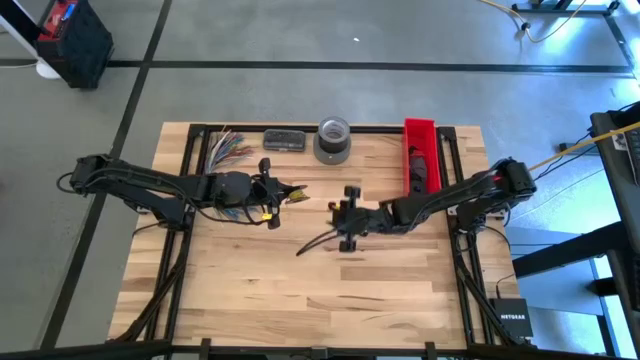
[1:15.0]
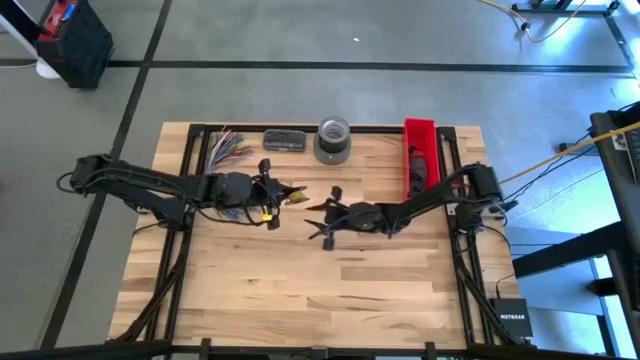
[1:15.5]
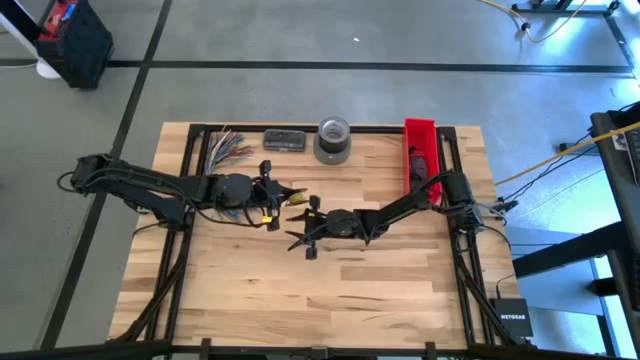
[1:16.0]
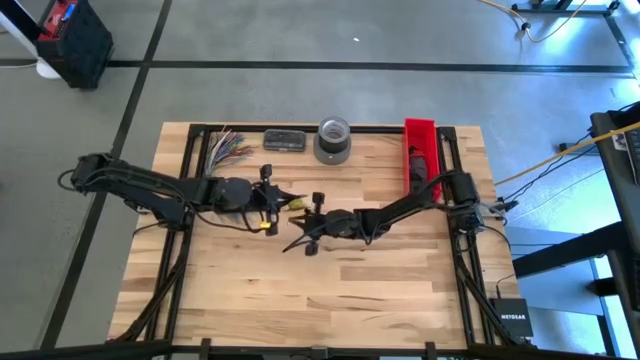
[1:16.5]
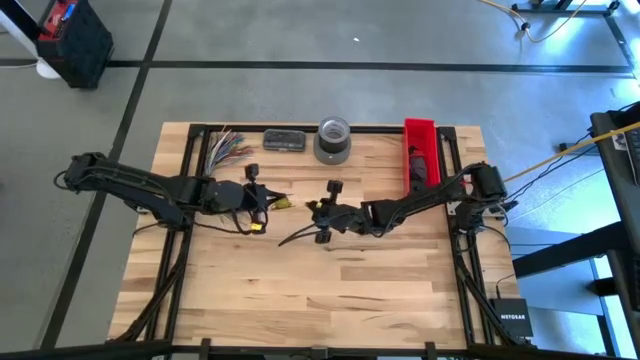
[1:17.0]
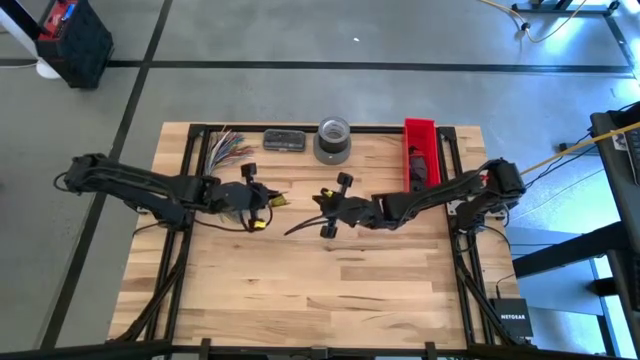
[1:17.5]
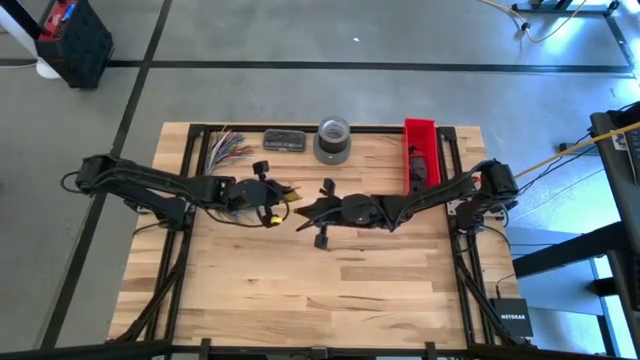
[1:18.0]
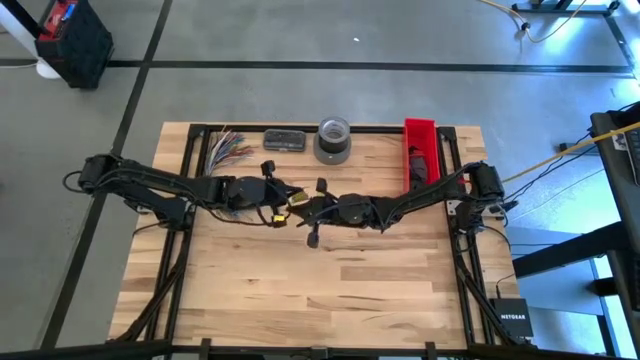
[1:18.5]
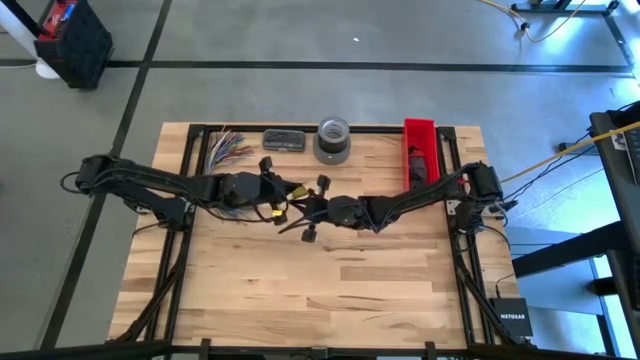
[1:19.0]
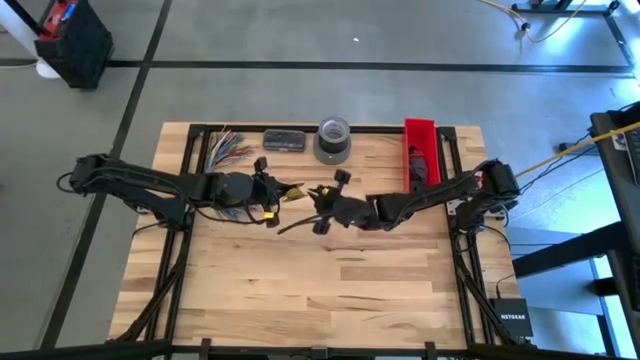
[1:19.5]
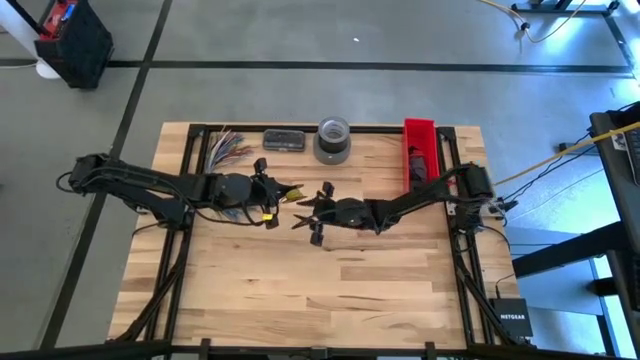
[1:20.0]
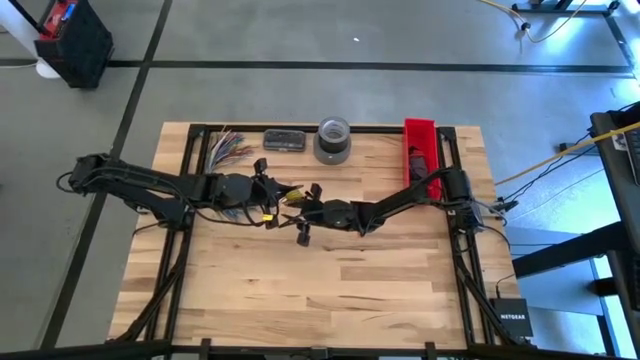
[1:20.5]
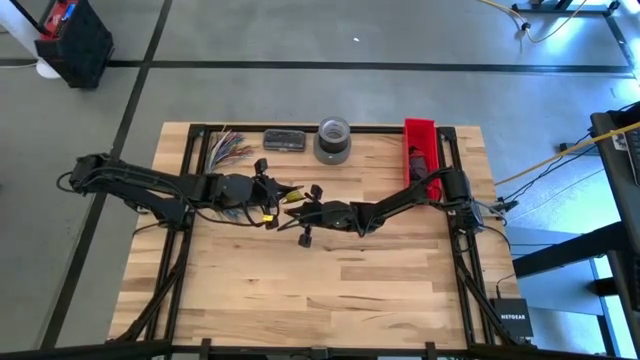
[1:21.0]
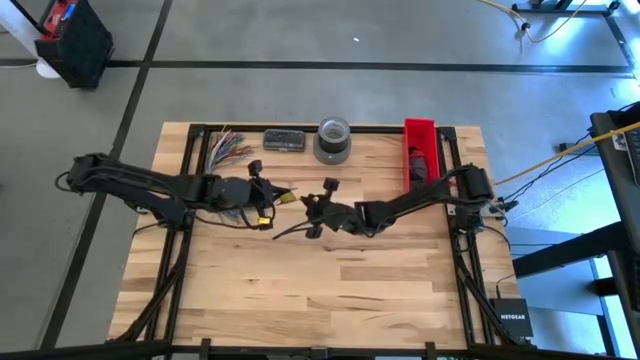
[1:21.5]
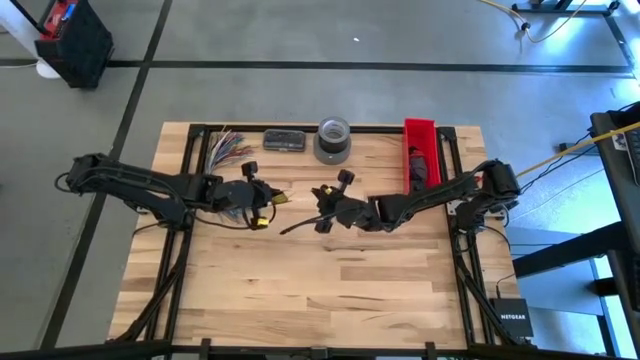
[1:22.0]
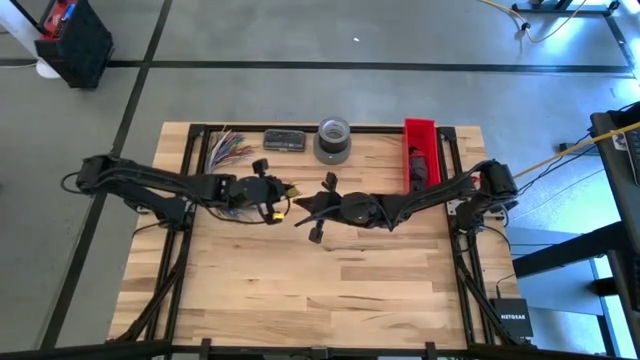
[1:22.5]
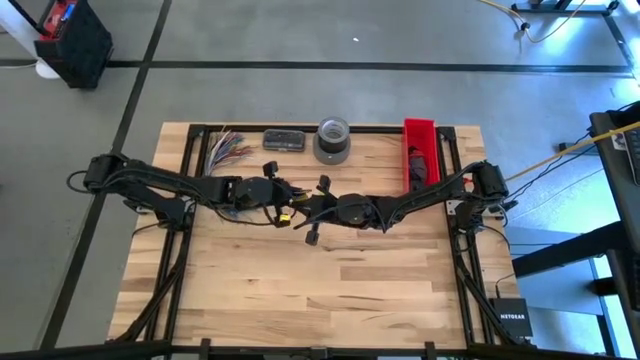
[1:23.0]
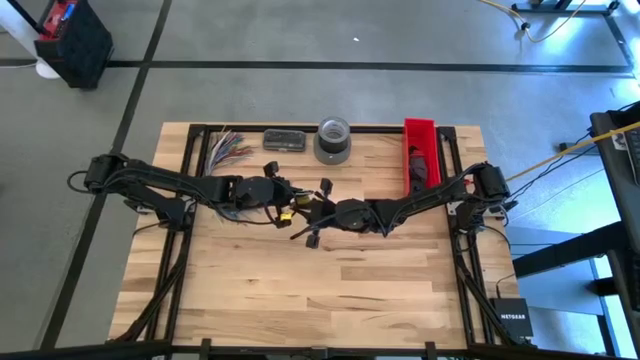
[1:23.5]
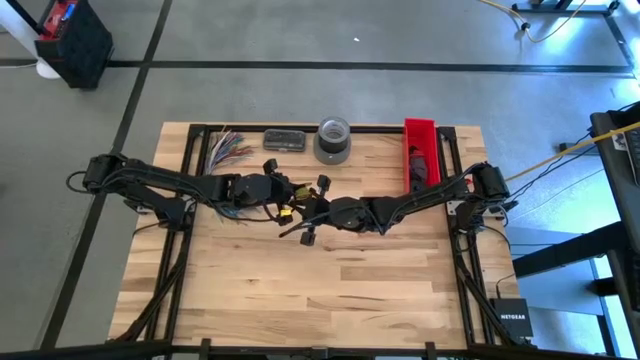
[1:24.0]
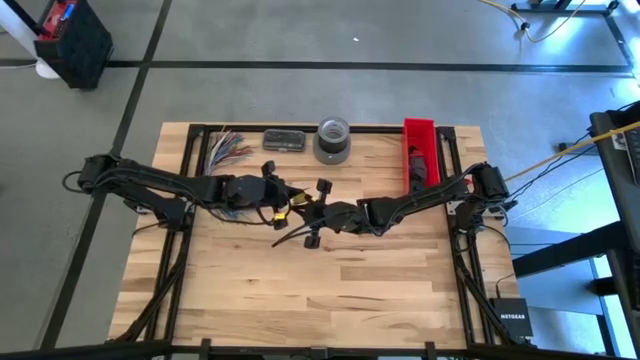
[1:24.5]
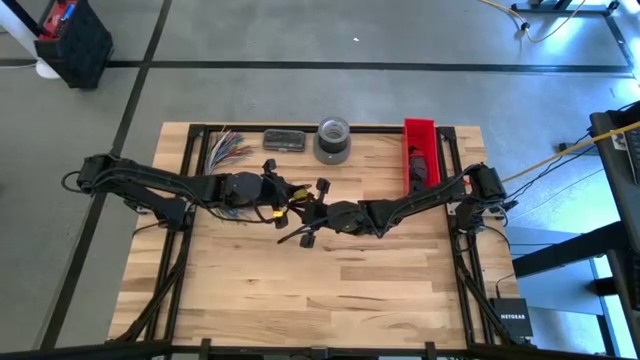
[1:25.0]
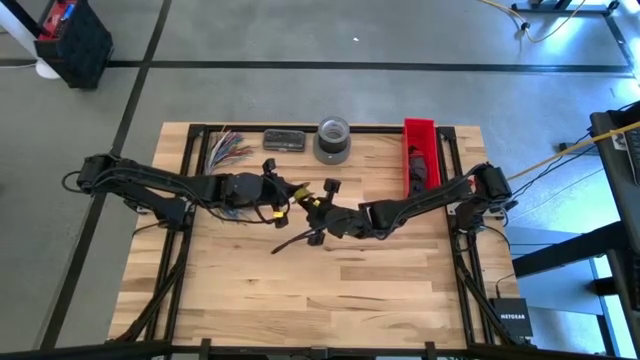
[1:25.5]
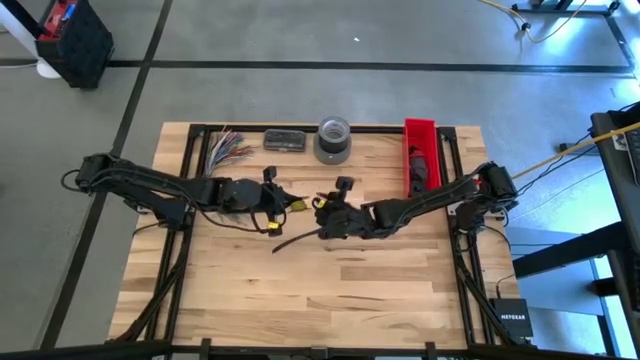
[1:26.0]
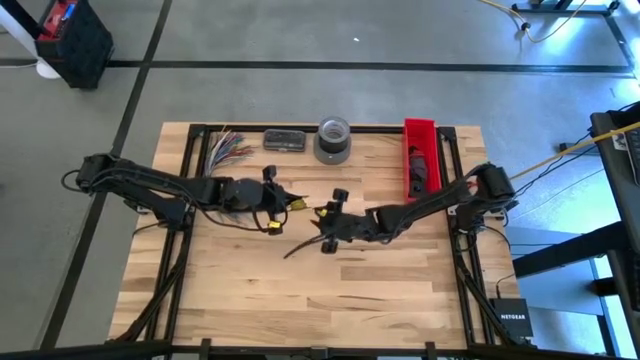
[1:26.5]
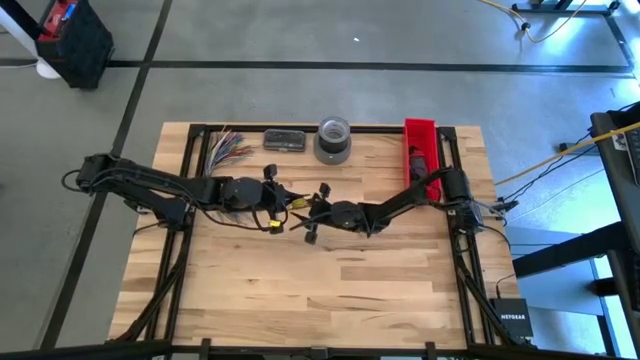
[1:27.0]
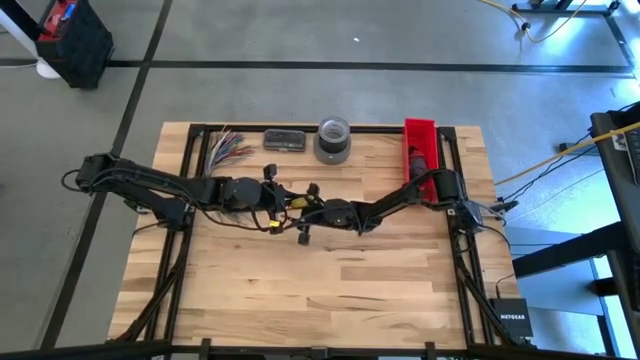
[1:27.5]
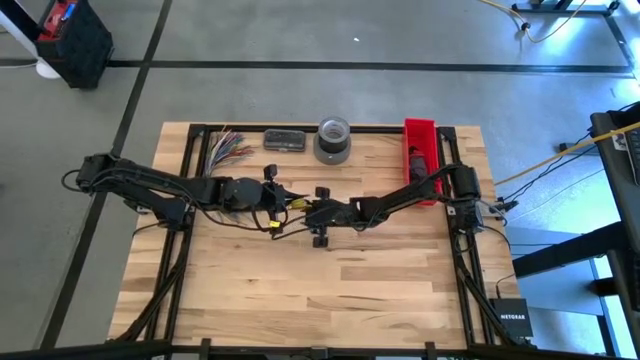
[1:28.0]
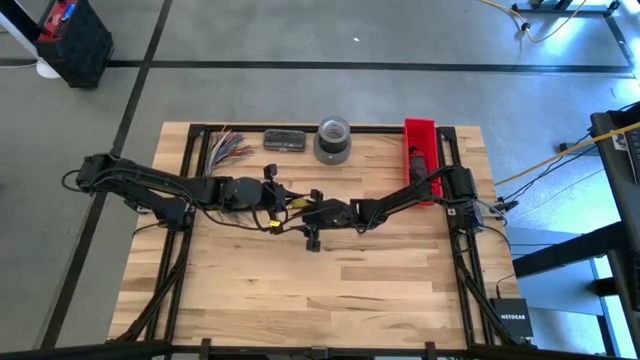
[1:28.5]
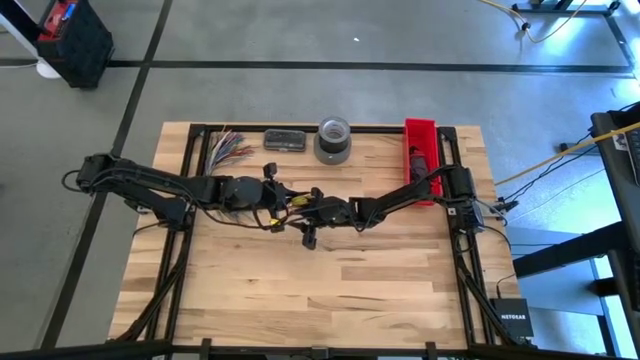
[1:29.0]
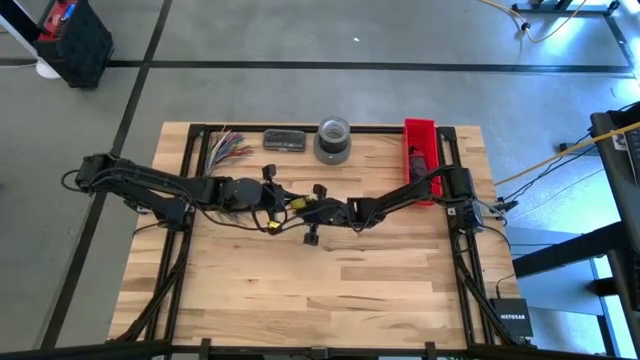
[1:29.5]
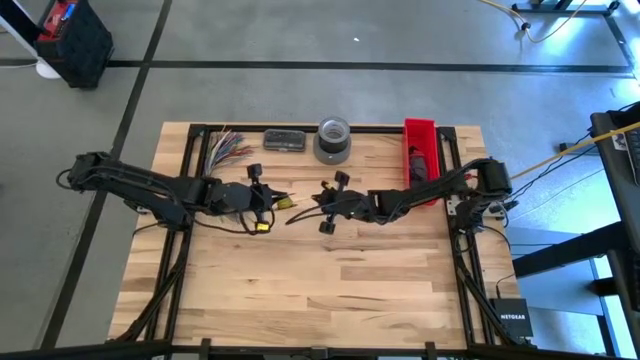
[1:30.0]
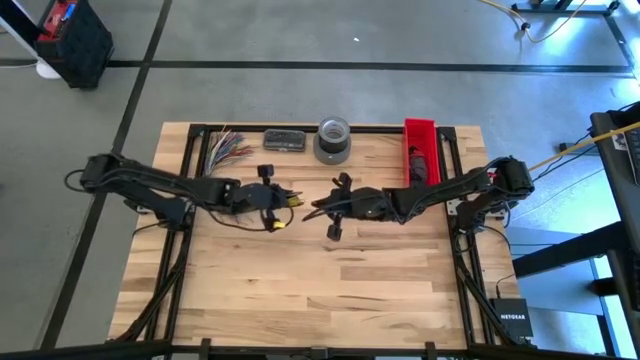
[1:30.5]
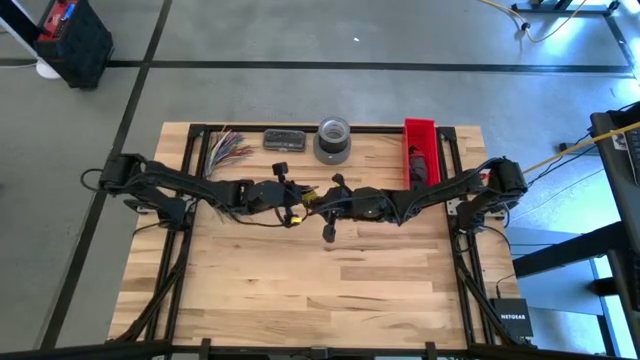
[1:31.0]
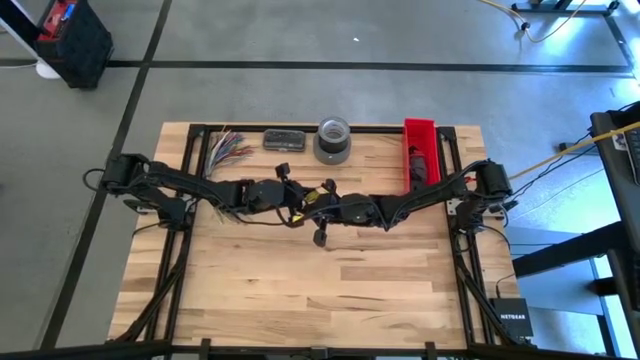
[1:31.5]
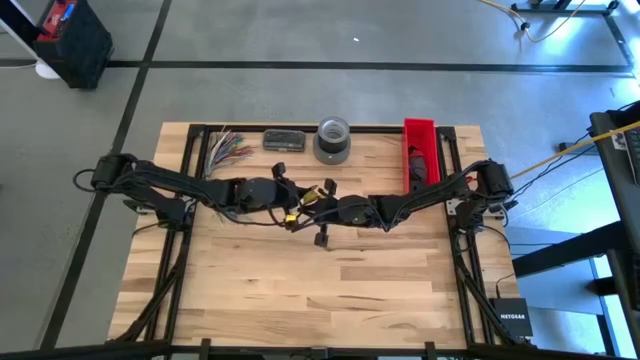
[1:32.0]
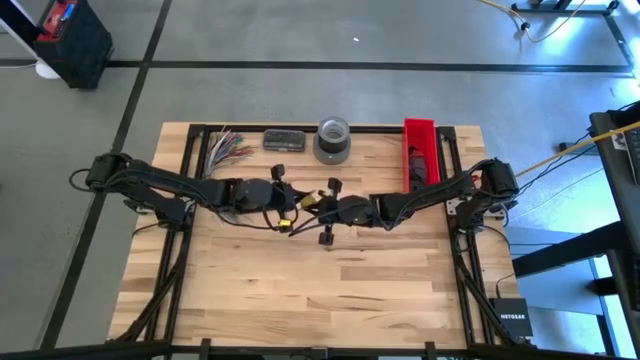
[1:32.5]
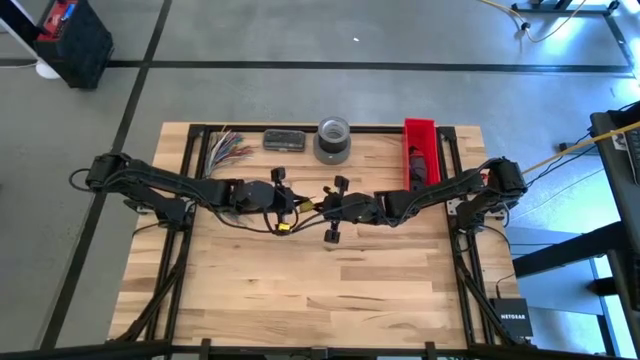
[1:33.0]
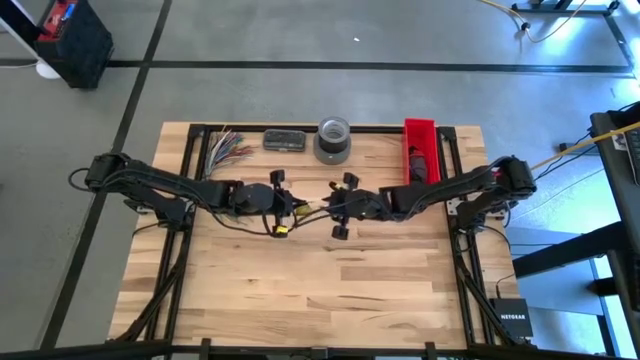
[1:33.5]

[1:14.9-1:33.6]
Task: Coil cords
Coil the yellow wire onto the spool

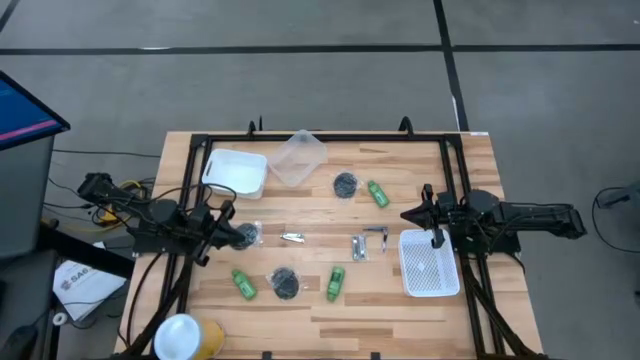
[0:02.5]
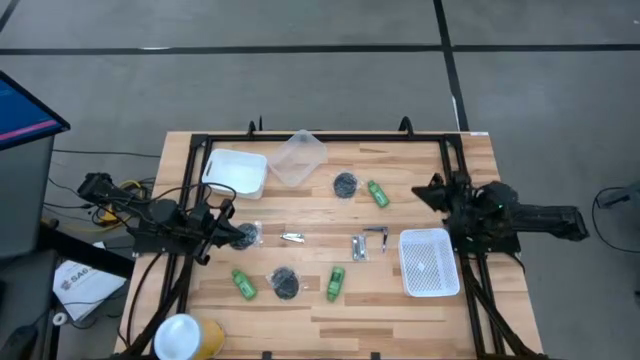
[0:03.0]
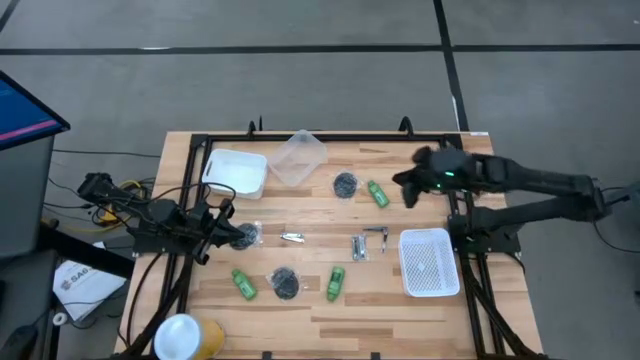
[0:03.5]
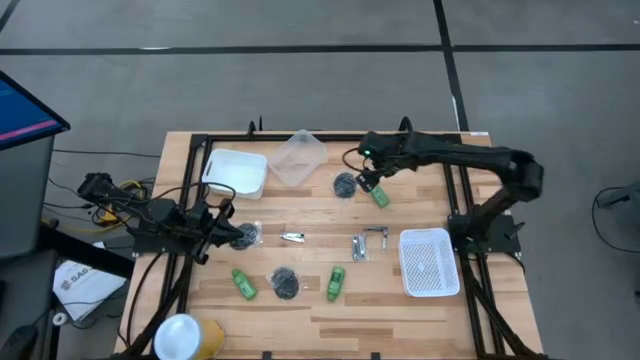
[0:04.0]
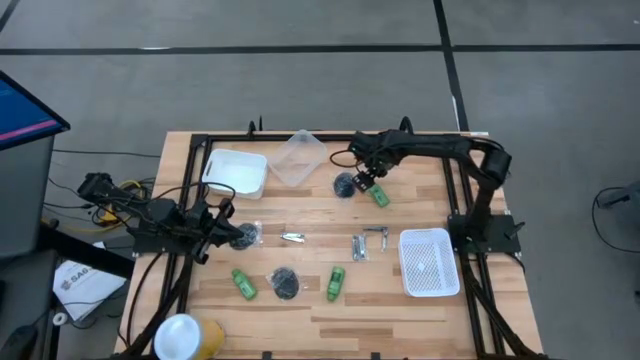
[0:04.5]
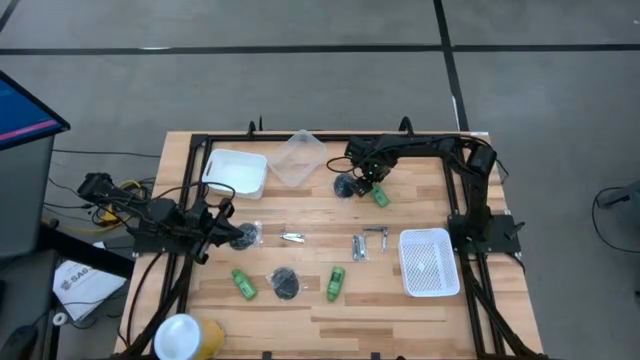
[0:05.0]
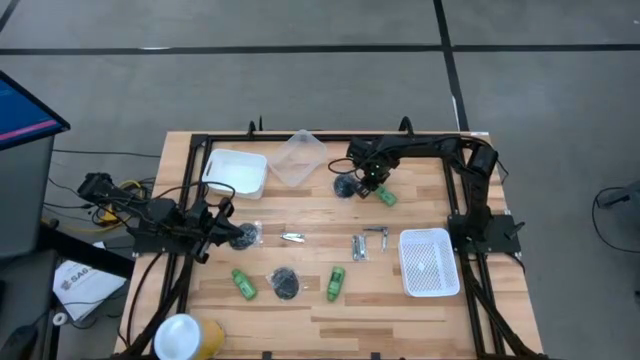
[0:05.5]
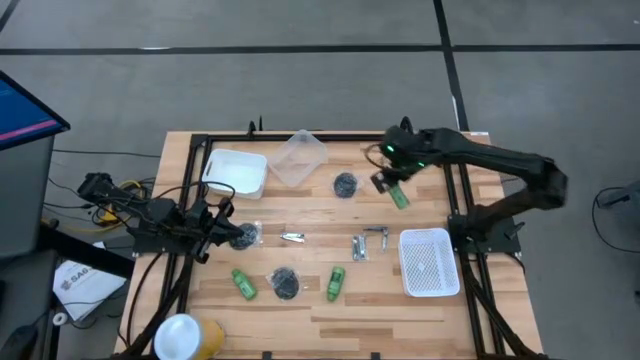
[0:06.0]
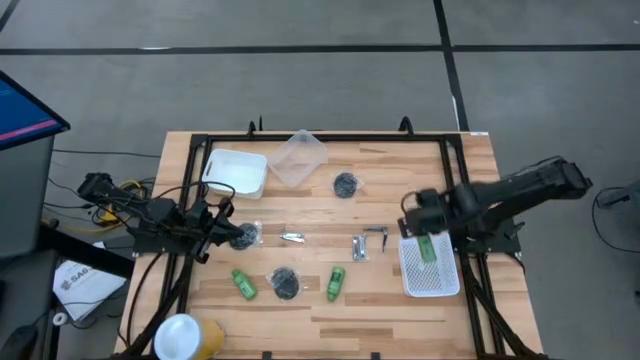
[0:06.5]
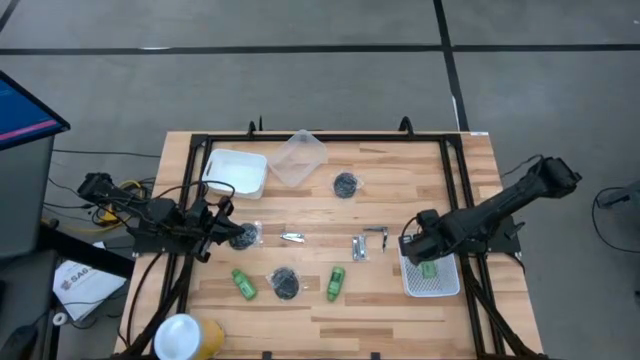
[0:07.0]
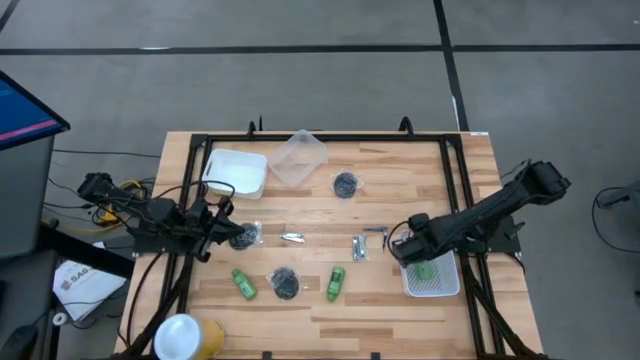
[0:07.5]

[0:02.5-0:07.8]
Task: Pick & Place Travel size toiletries
Put the green shampoo into the bottom white bin
